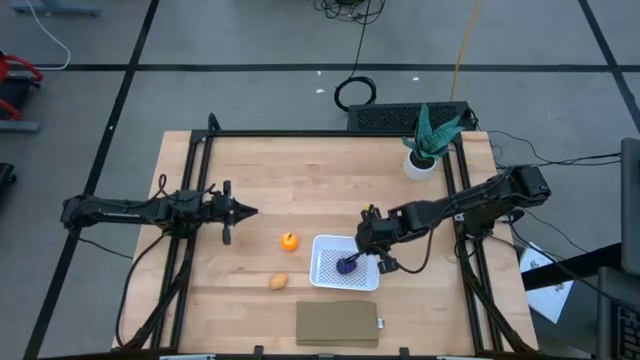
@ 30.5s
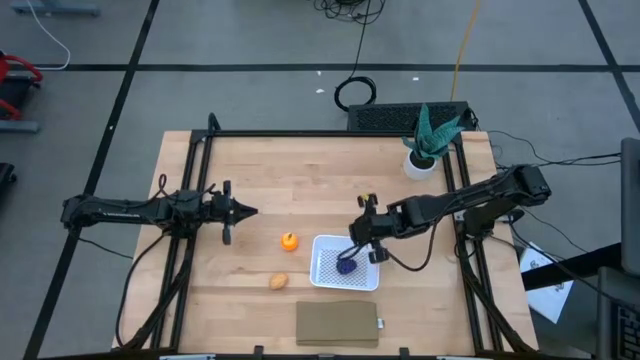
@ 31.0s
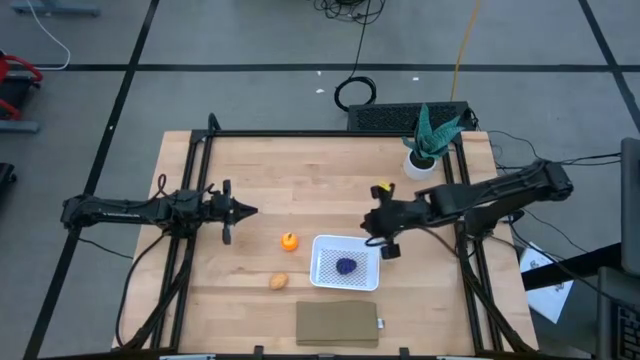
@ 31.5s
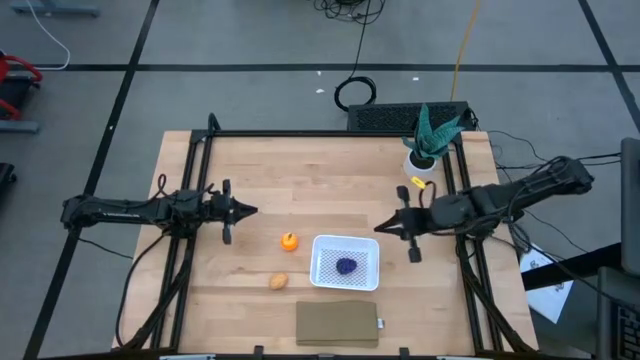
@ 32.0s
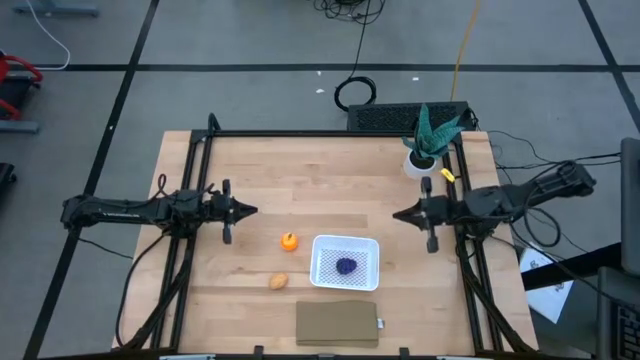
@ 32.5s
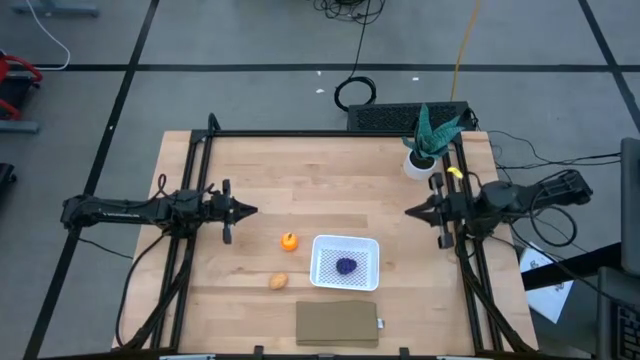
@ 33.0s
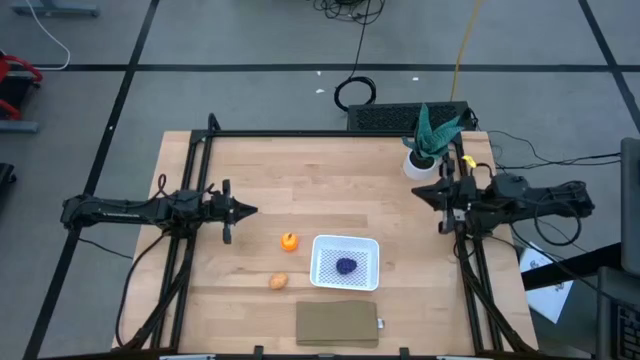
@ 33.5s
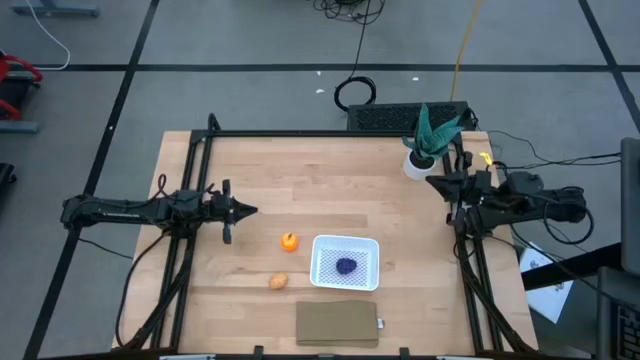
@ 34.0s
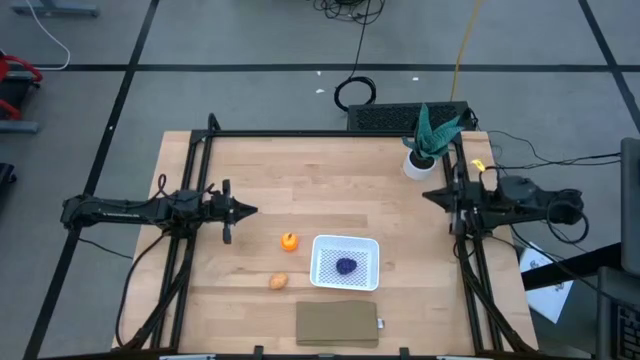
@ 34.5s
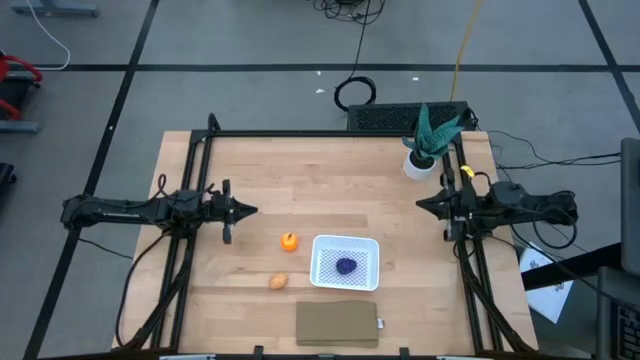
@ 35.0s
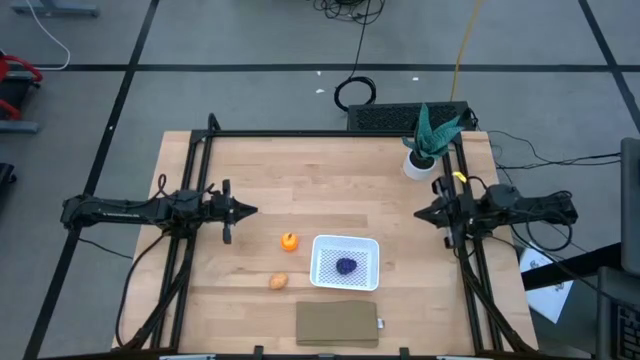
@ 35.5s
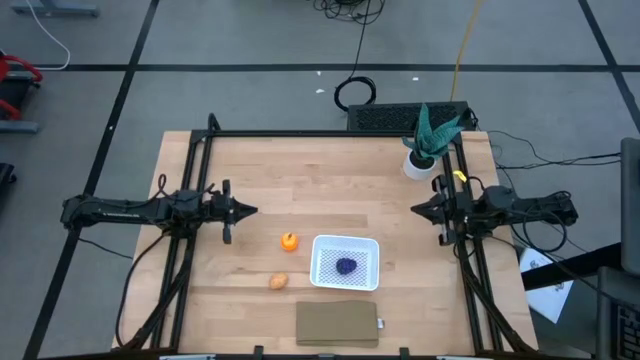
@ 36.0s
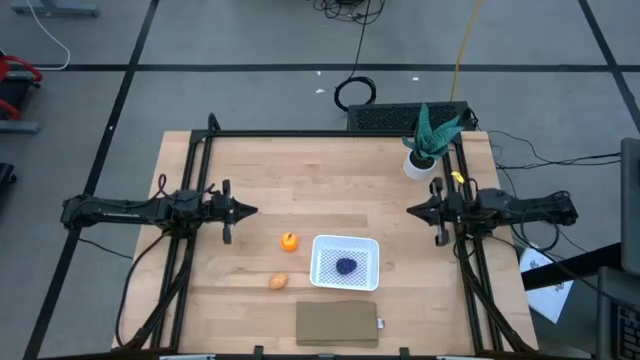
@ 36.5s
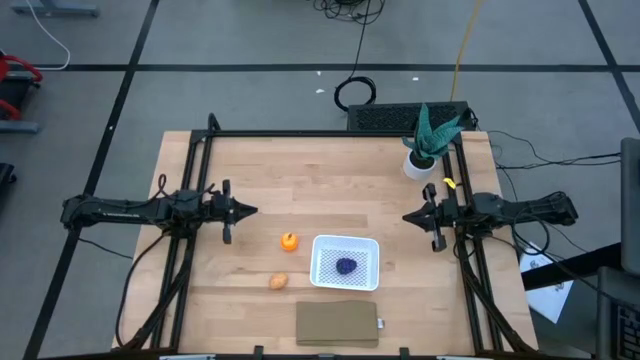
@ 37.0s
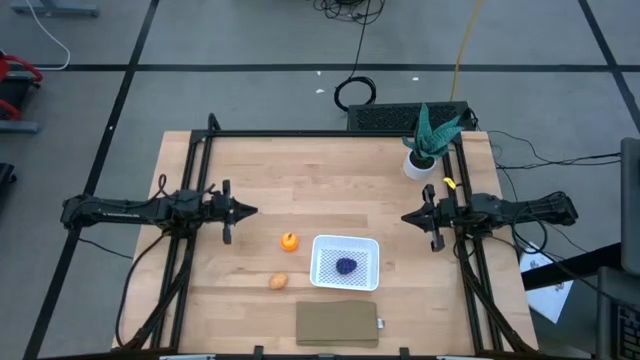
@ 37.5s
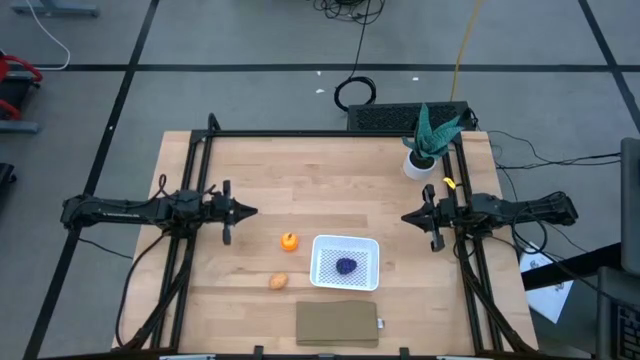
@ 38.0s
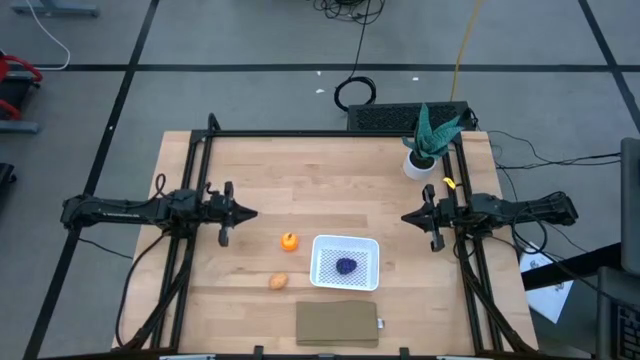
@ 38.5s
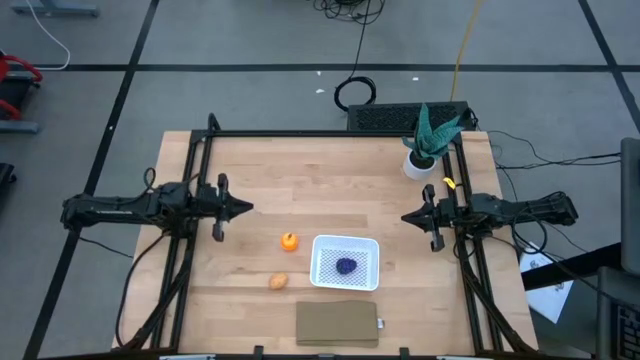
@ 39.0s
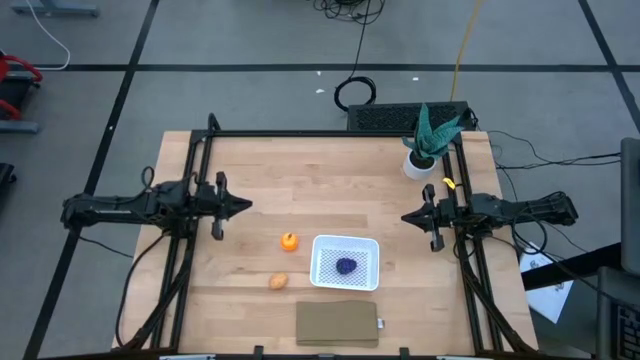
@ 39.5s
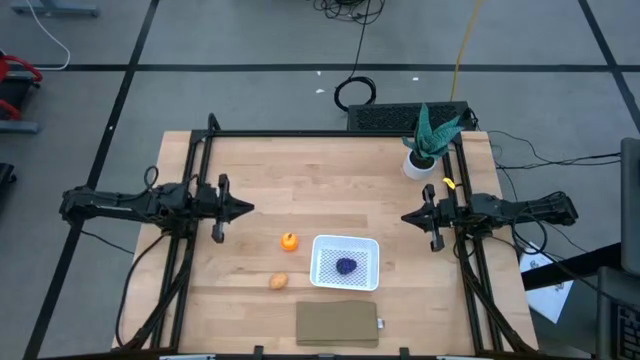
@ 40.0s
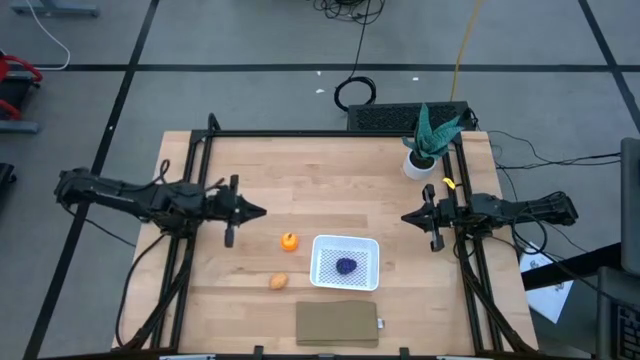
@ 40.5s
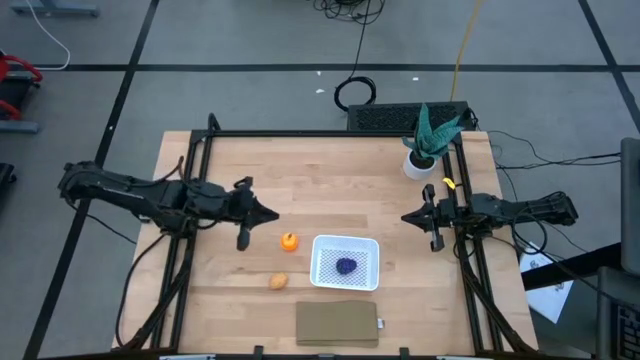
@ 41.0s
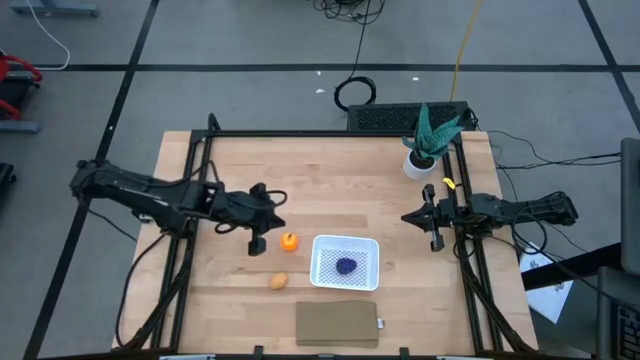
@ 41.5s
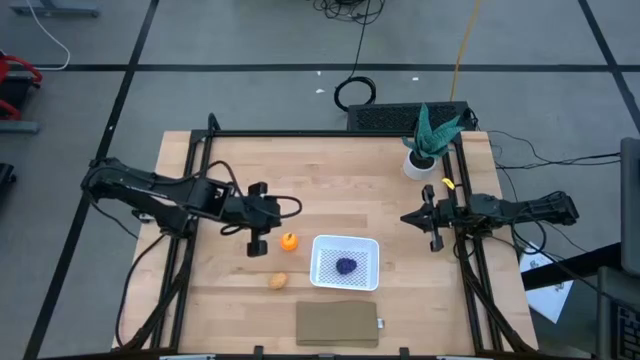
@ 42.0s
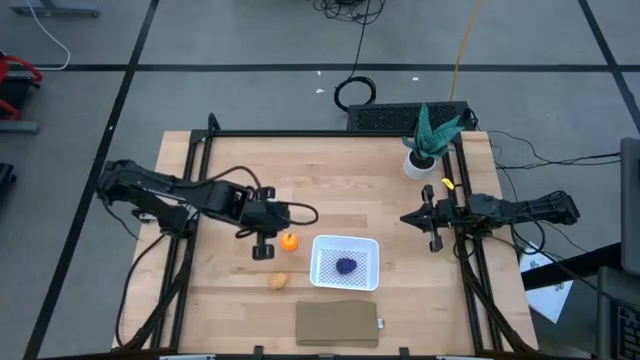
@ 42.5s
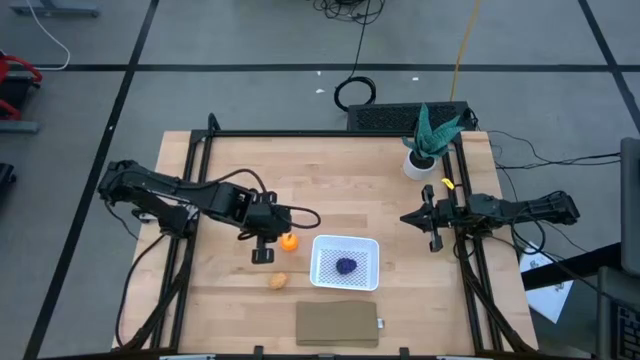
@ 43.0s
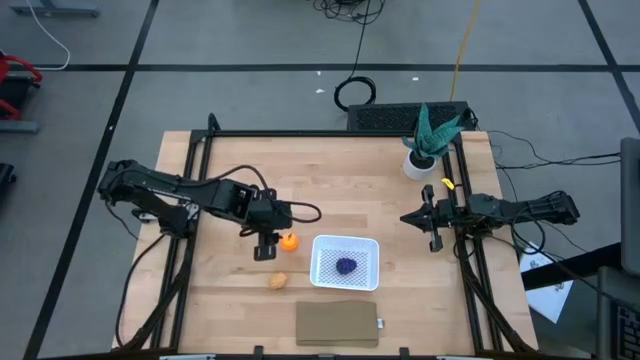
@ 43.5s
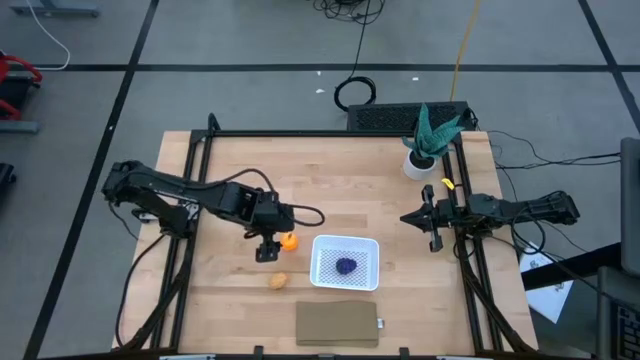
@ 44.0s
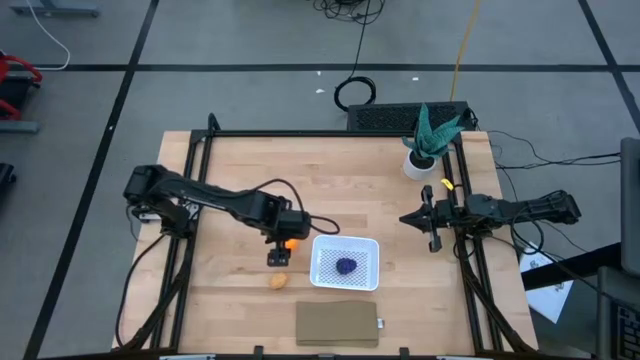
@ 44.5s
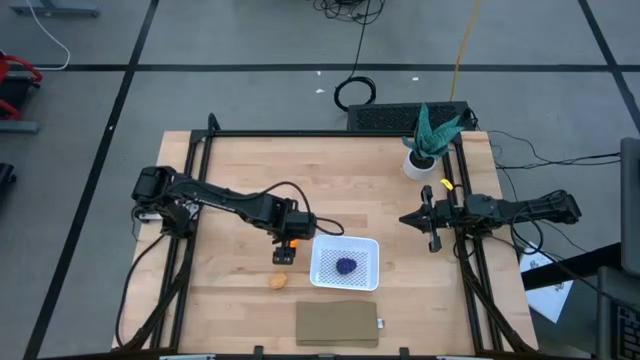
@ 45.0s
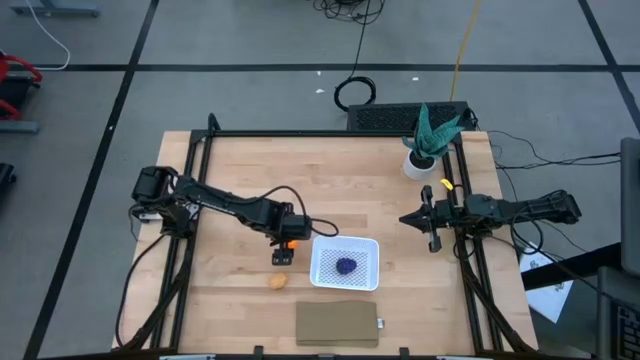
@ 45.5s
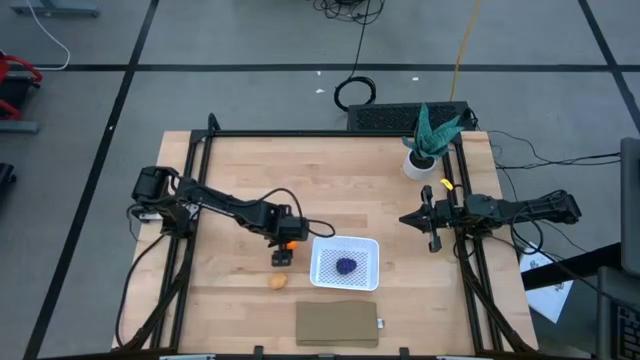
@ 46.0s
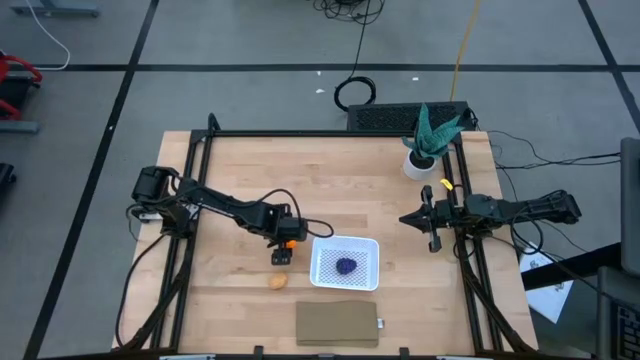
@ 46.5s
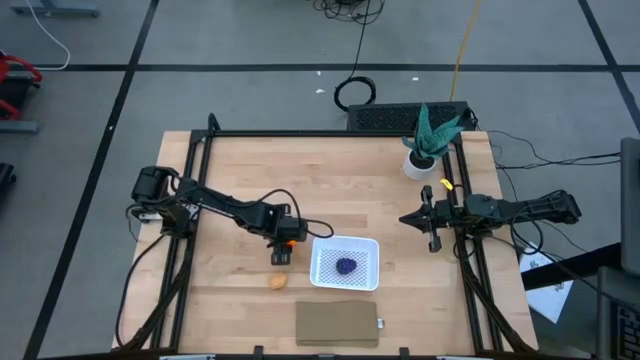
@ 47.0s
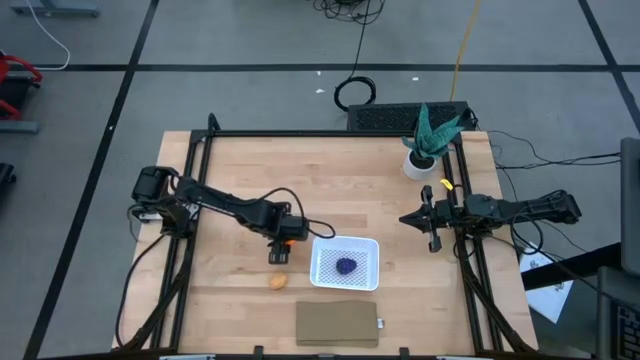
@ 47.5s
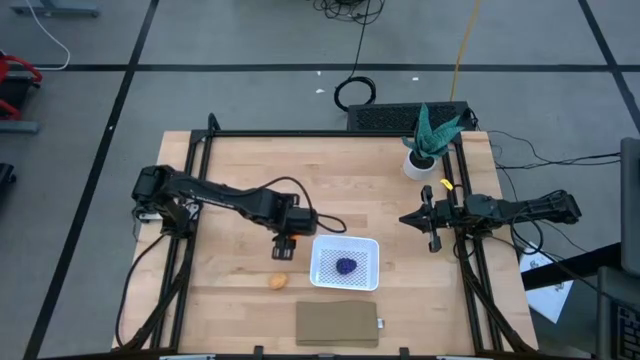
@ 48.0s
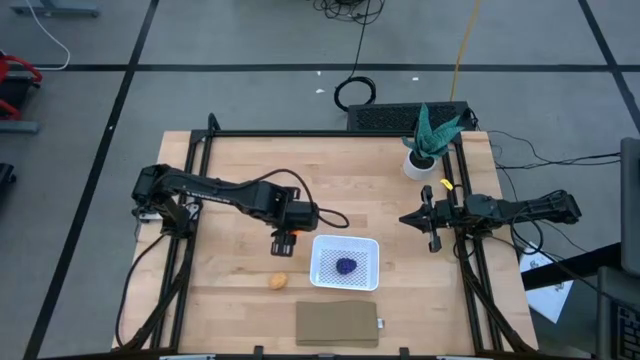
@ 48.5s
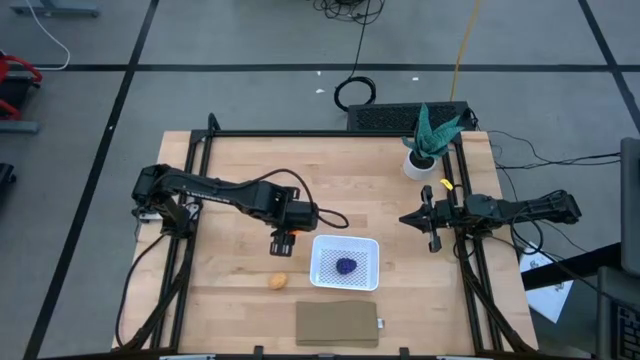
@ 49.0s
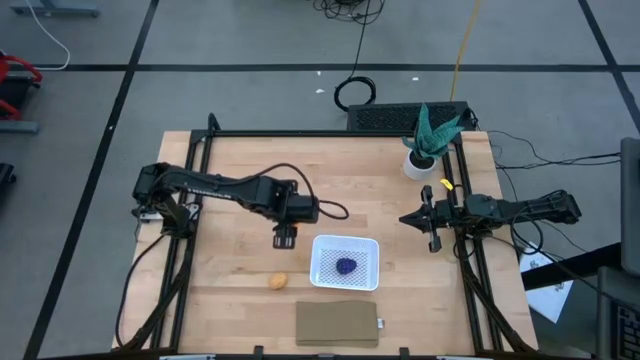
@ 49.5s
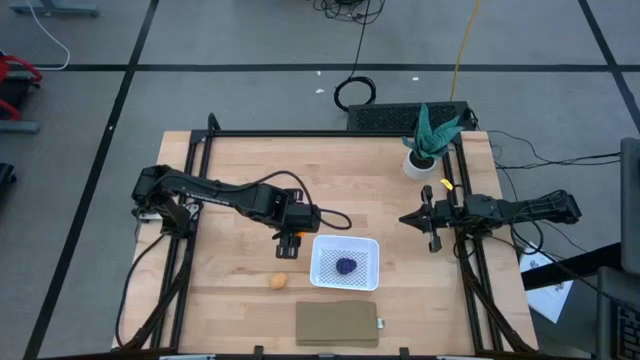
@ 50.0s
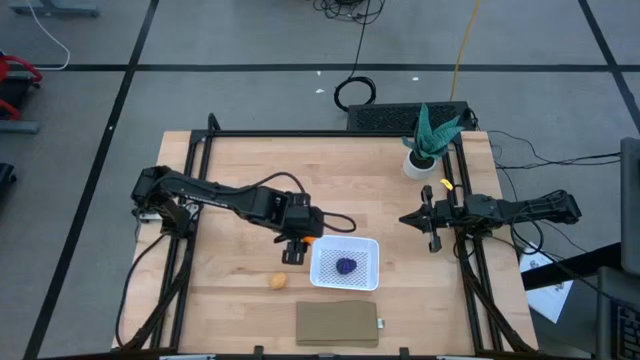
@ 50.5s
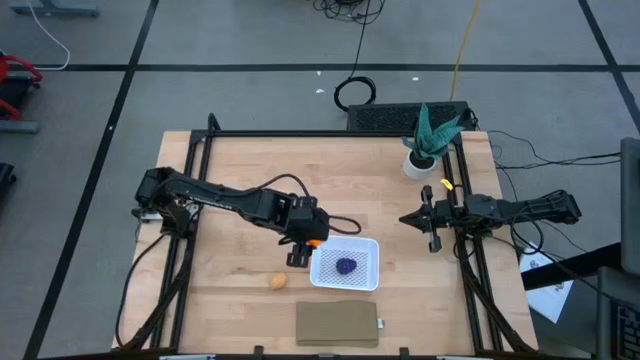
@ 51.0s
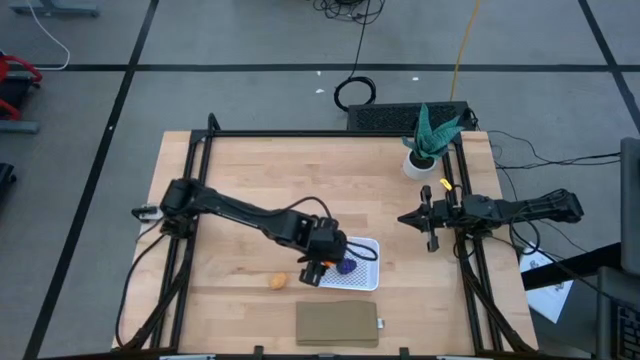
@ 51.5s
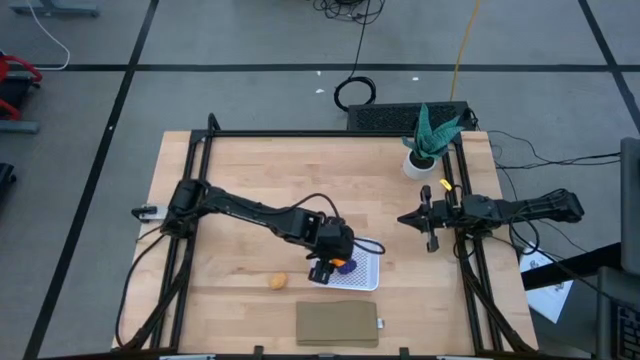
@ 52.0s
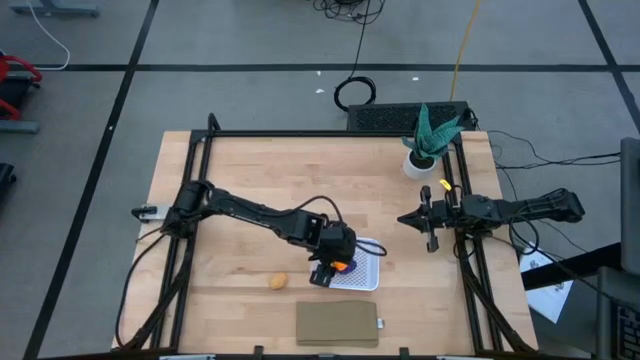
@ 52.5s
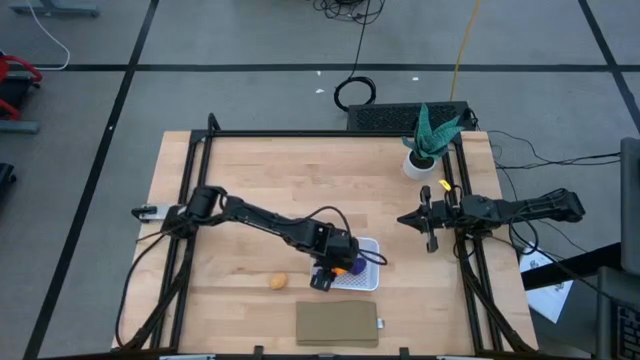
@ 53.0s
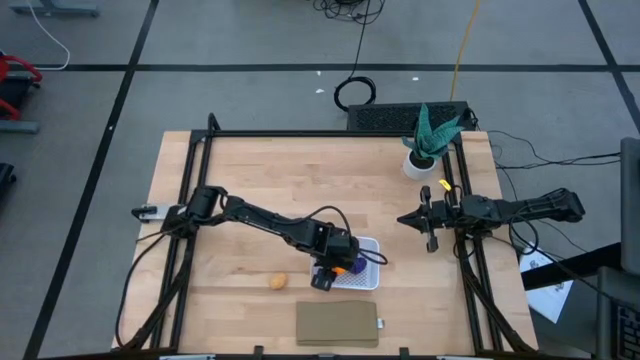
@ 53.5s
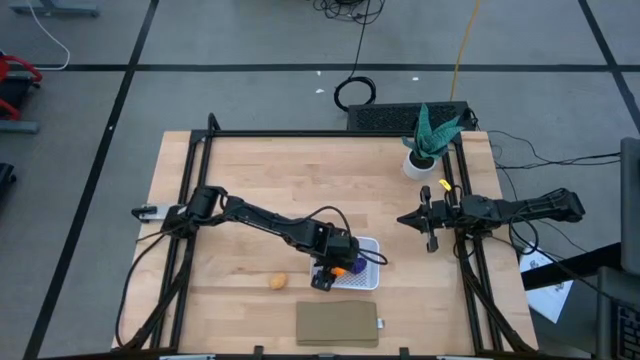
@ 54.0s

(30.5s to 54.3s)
Task: Pick and placing Produce into tupperware
Put the orange into the white basket
